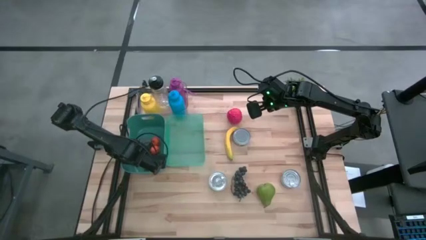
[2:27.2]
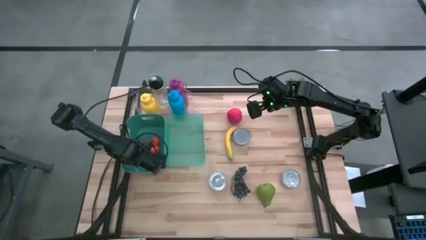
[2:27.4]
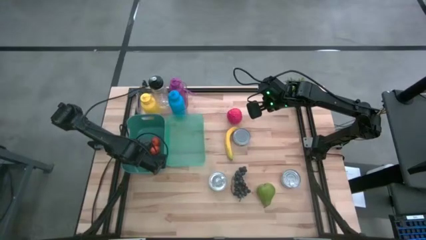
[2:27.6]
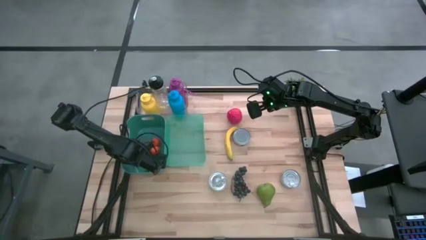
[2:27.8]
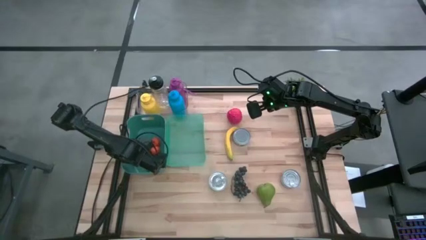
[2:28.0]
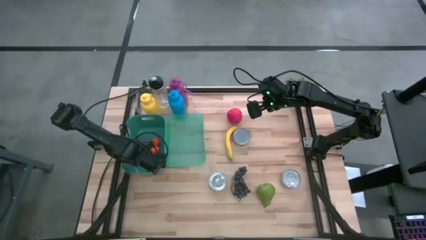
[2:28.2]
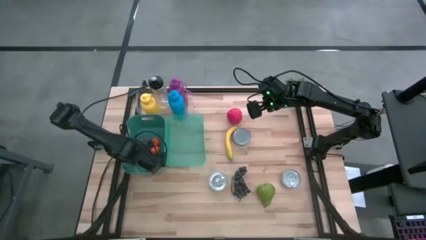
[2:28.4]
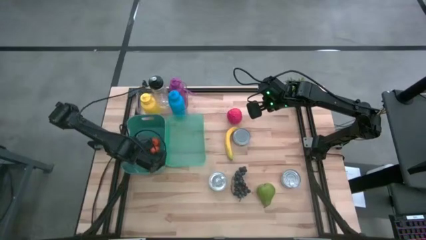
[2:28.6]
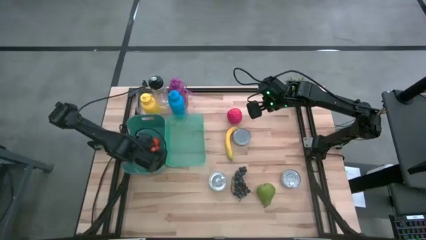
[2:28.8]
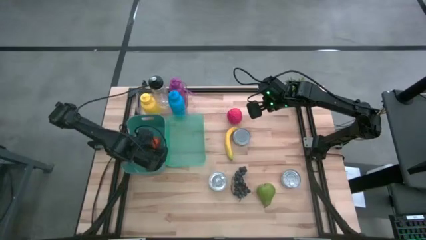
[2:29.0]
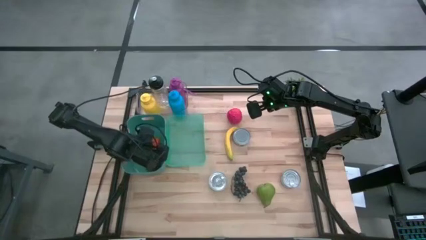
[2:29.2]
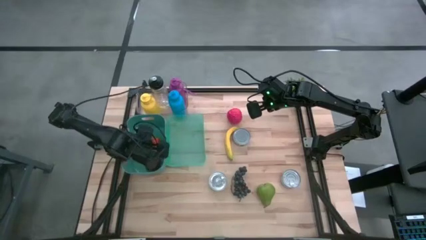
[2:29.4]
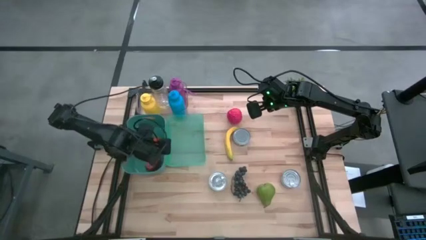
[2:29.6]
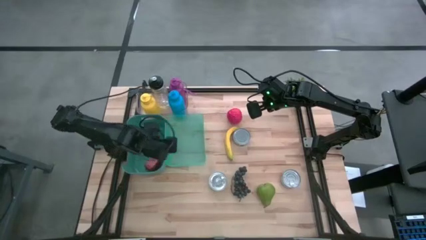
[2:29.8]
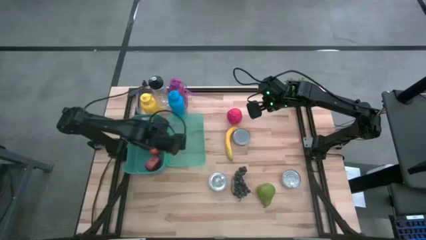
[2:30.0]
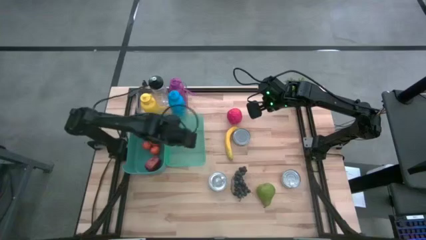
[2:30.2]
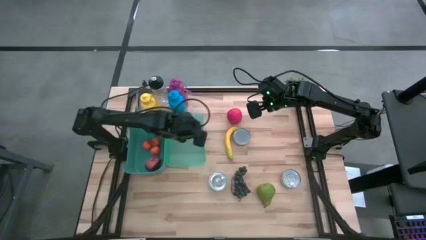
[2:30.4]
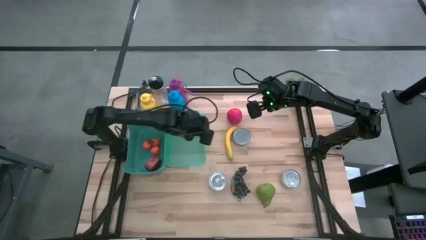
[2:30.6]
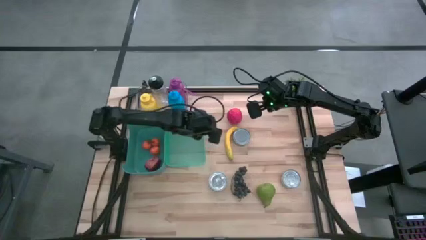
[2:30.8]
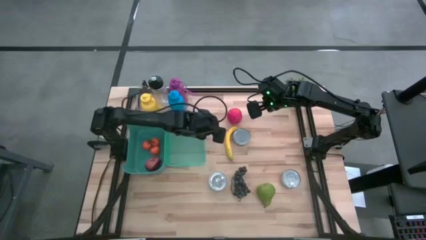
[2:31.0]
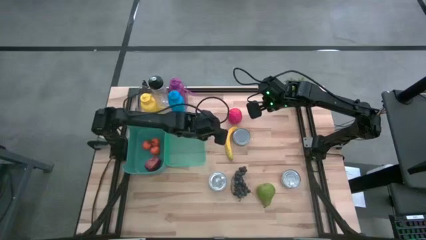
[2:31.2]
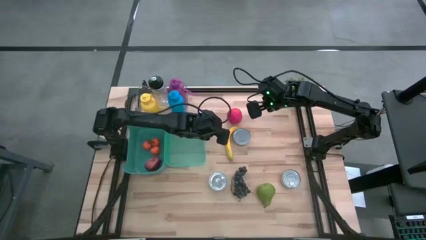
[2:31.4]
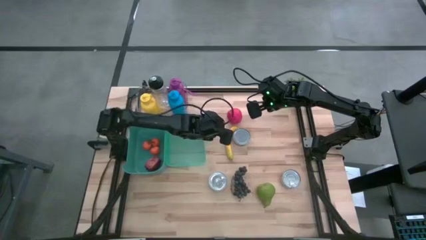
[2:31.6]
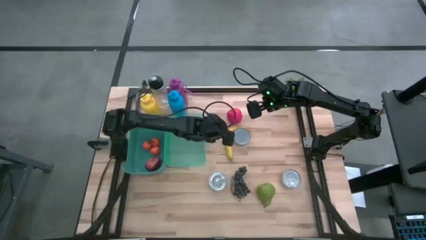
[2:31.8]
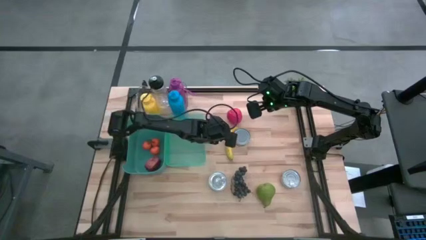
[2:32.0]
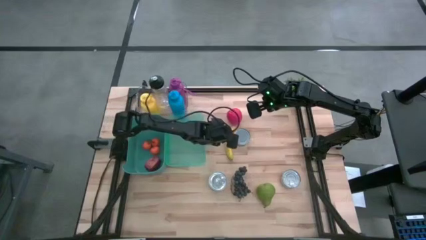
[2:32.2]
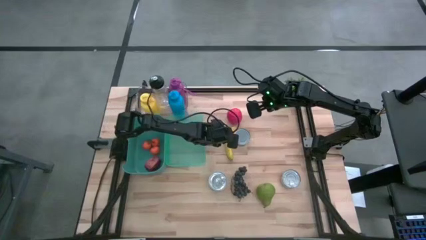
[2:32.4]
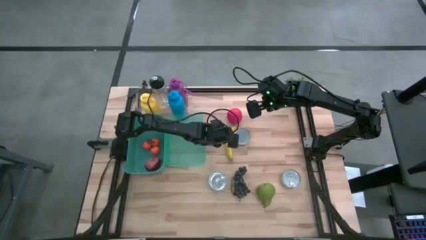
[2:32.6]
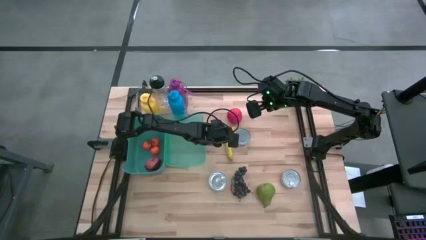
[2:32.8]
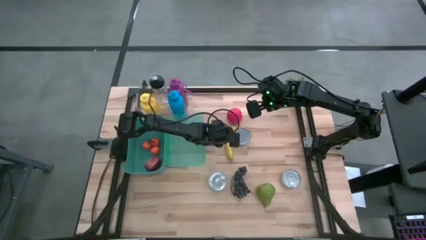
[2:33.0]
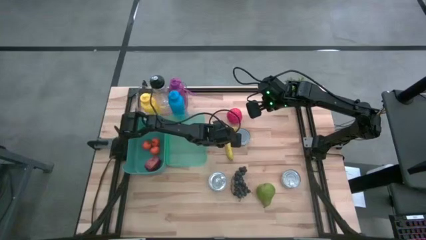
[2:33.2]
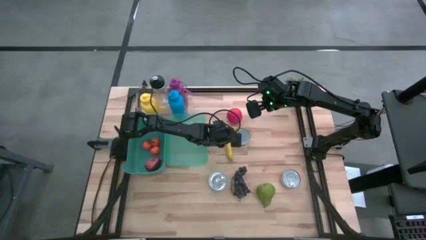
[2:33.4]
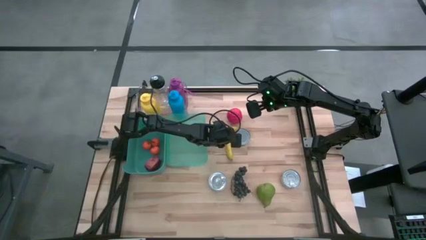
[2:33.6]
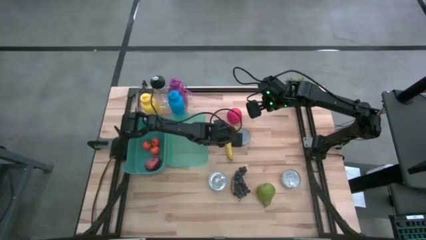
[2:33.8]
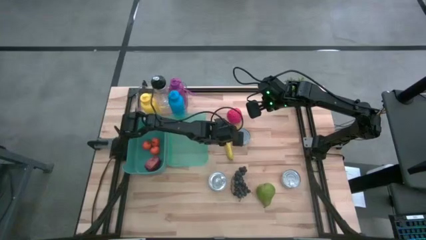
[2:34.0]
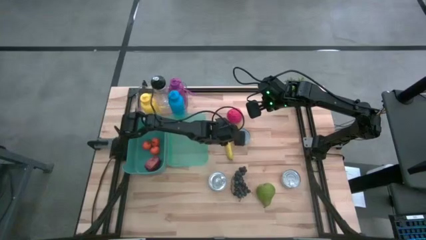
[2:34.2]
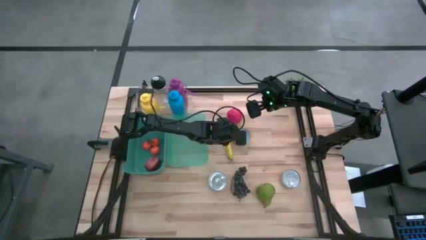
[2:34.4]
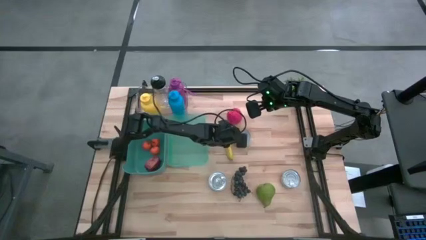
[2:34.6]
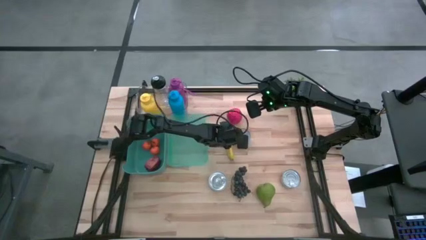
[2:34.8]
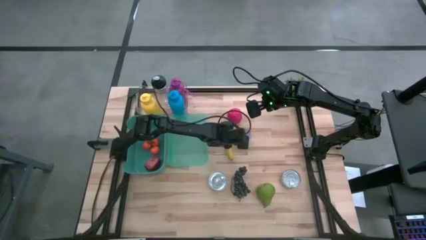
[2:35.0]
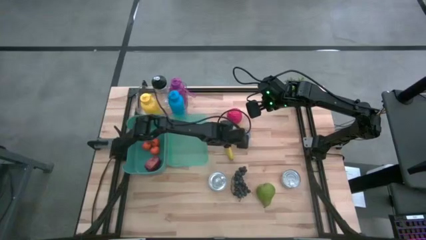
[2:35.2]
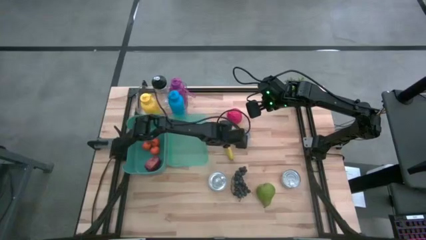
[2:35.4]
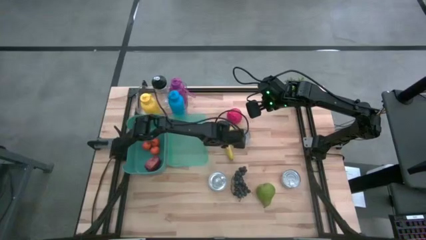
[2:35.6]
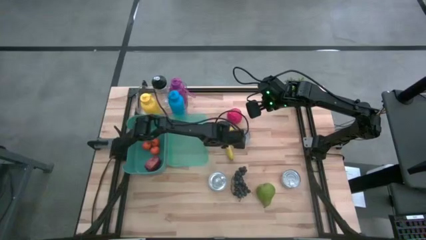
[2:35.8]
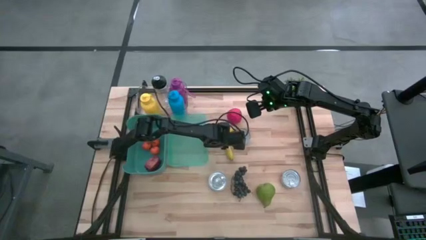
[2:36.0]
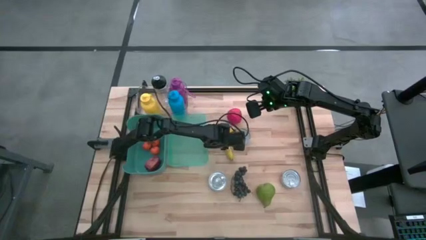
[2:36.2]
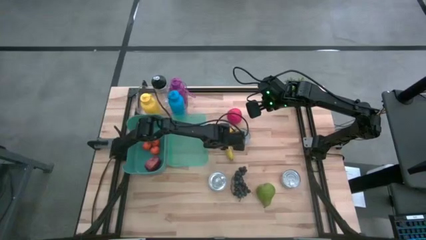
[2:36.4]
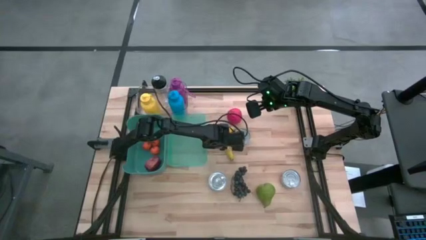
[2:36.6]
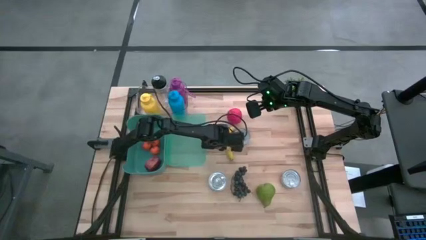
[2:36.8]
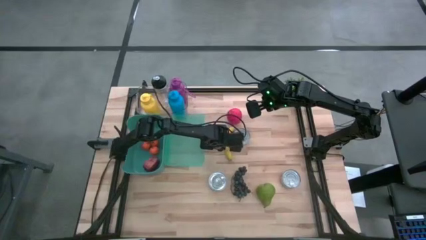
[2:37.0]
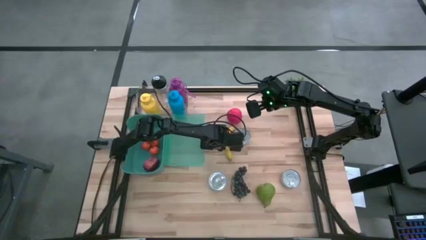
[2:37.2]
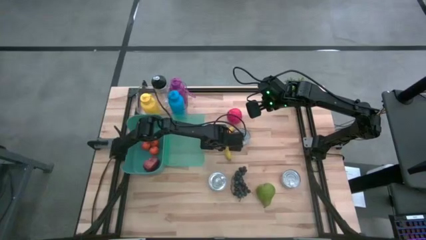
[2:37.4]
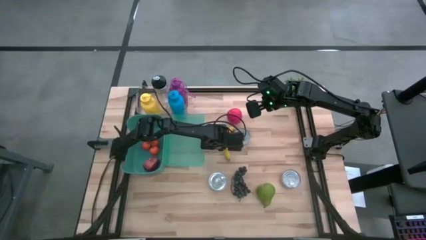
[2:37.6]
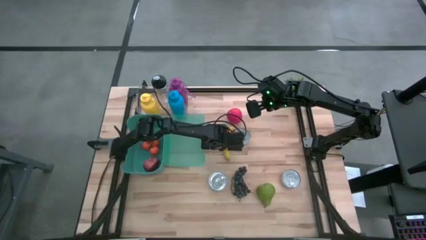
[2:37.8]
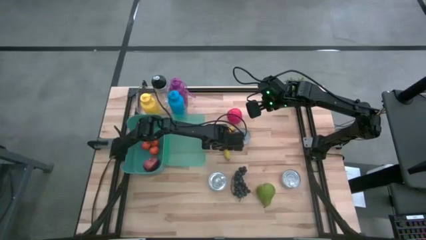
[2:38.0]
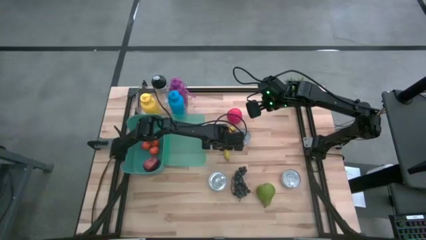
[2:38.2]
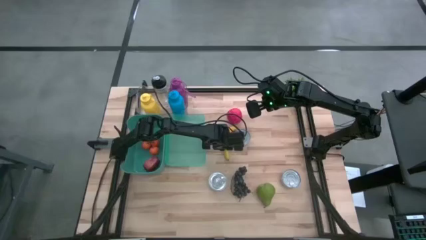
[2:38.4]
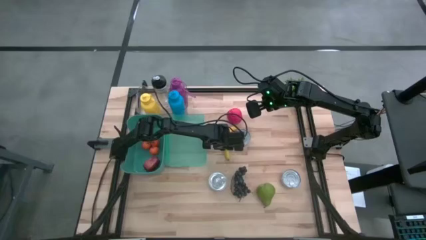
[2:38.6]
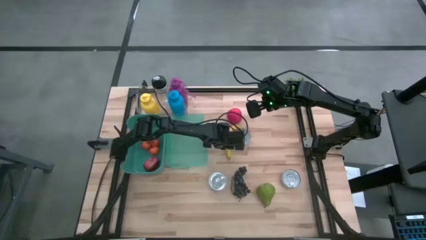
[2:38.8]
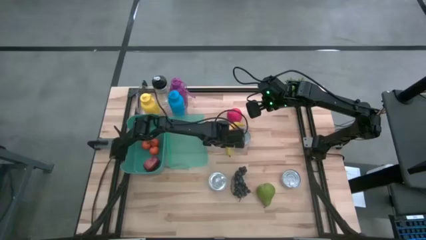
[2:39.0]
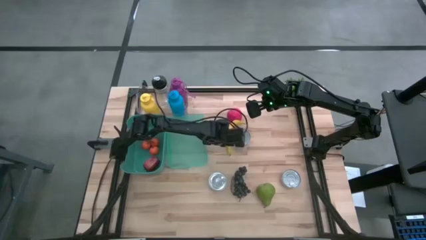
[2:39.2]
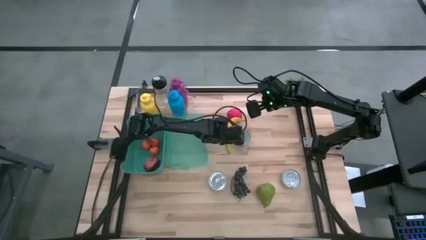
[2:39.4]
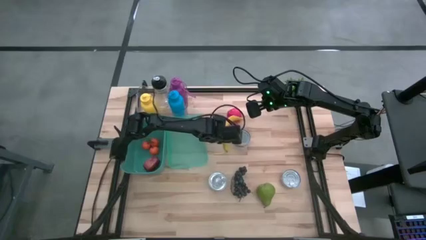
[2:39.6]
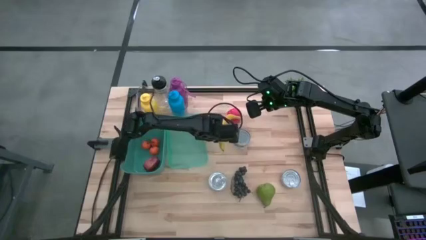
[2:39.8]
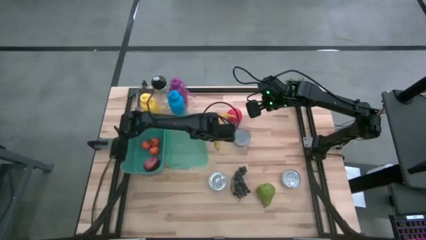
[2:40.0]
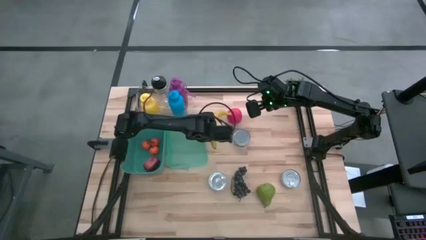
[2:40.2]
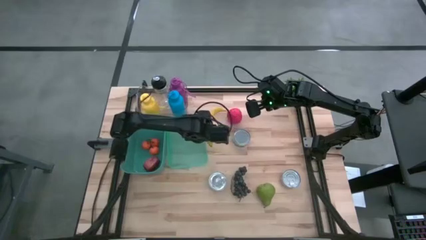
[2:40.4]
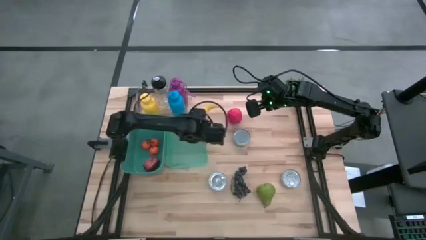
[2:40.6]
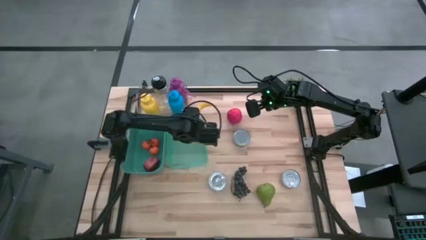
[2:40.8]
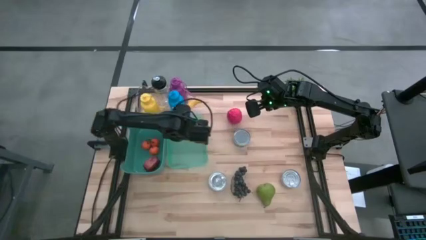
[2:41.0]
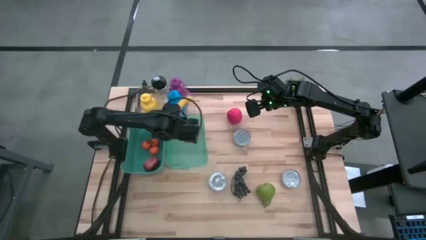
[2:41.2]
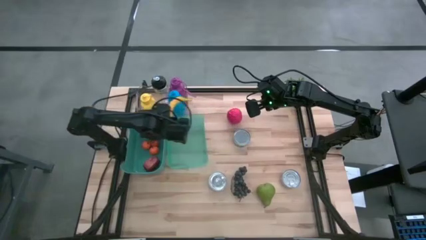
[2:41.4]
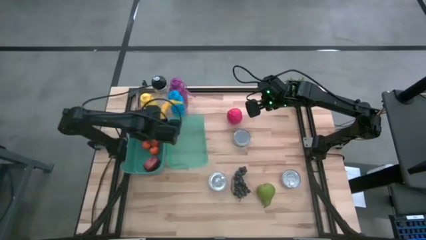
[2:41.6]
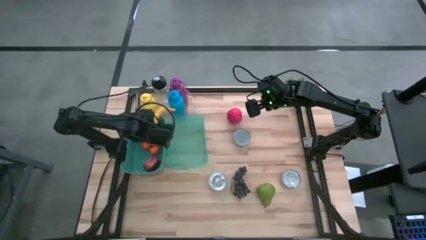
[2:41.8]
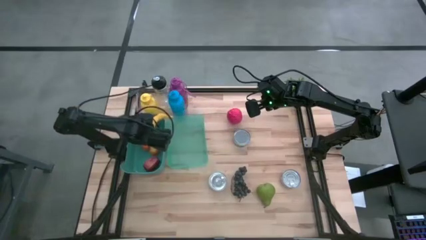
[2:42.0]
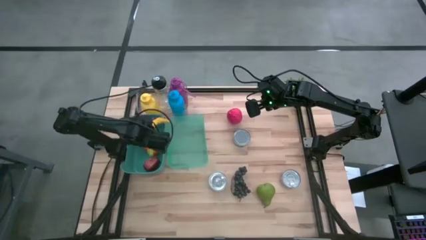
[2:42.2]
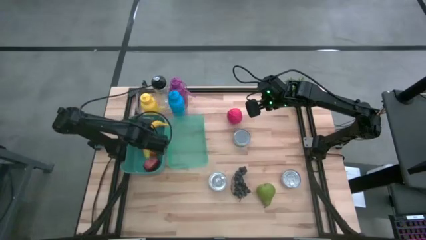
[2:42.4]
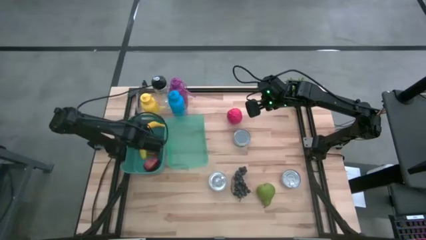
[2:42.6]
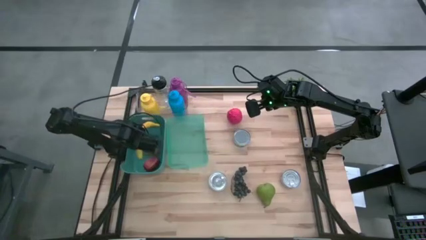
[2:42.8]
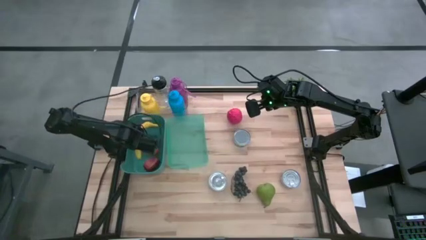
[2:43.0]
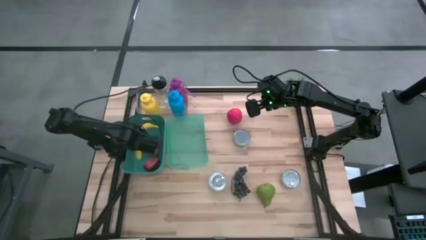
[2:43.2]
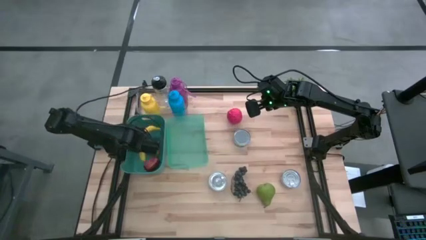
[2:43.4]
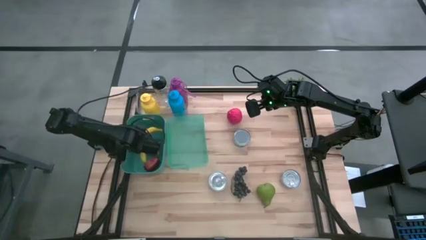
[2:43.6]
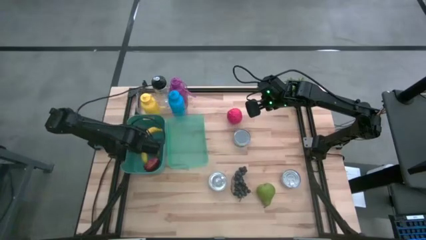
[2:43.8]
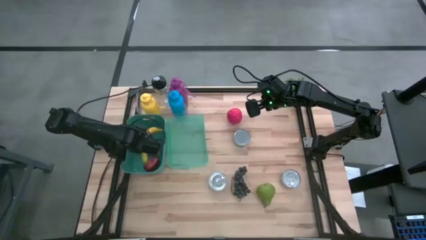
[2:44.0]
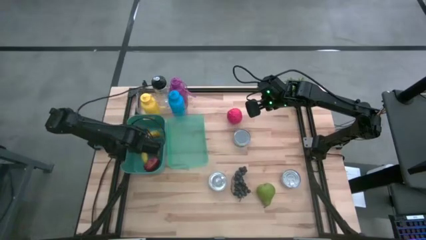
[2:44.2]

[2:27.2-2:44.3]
Task: Pick & Place Food Item
Put the banana into the green bin
